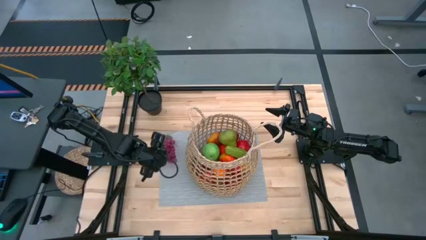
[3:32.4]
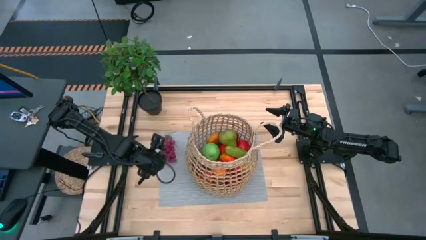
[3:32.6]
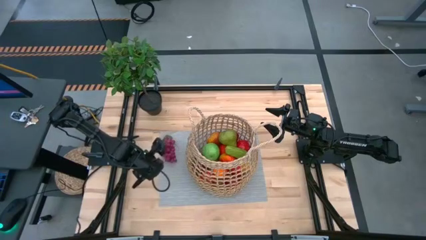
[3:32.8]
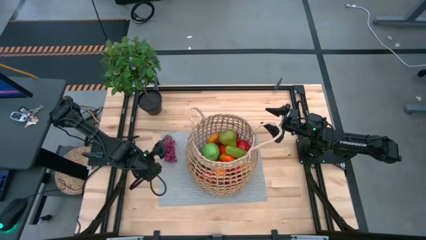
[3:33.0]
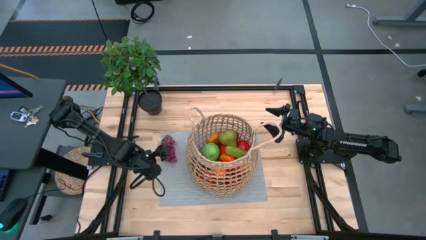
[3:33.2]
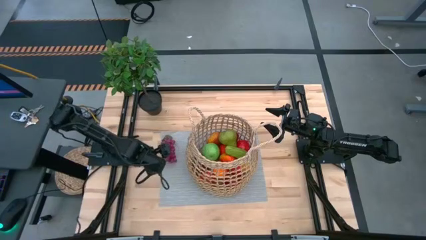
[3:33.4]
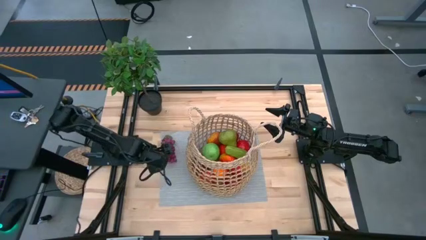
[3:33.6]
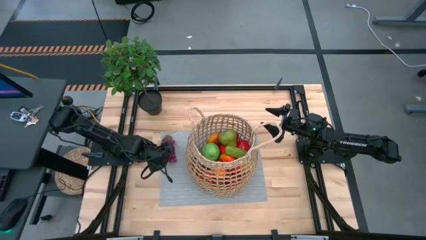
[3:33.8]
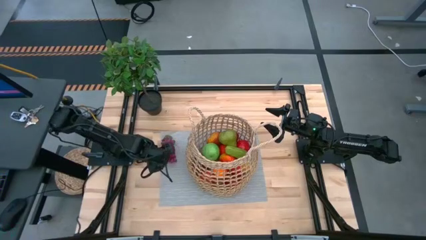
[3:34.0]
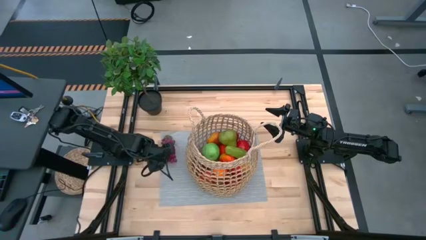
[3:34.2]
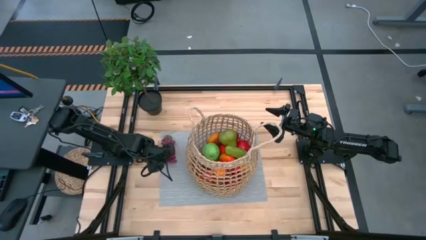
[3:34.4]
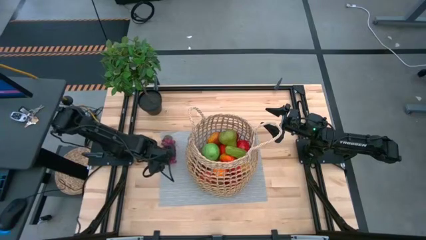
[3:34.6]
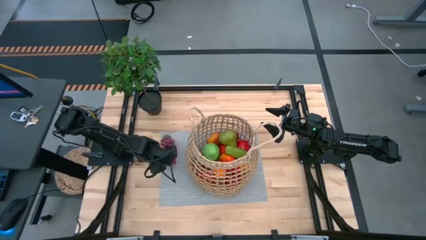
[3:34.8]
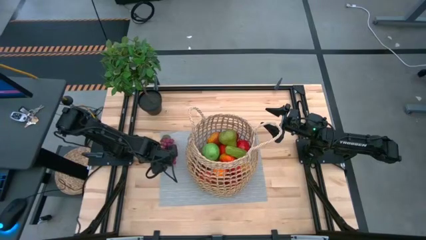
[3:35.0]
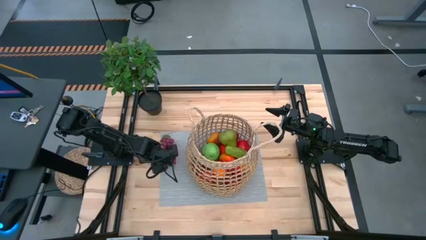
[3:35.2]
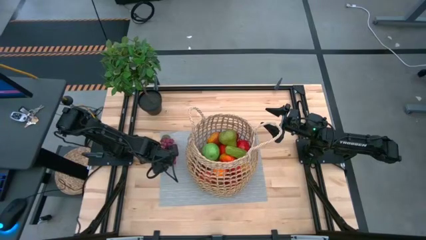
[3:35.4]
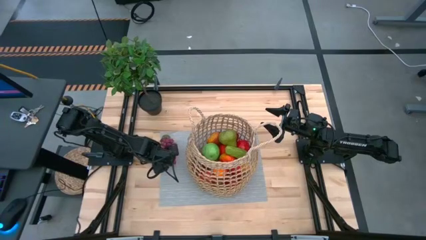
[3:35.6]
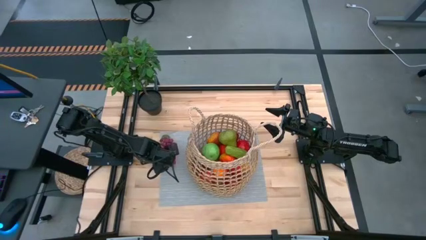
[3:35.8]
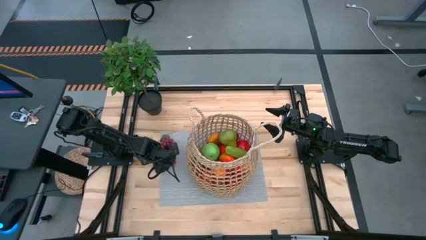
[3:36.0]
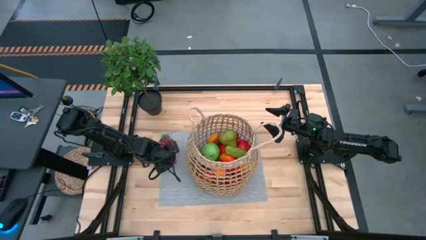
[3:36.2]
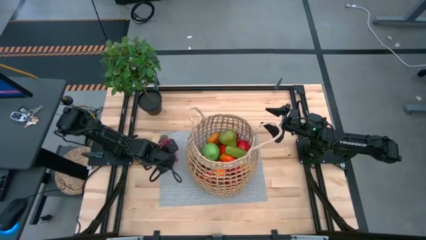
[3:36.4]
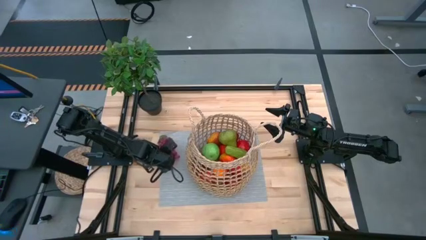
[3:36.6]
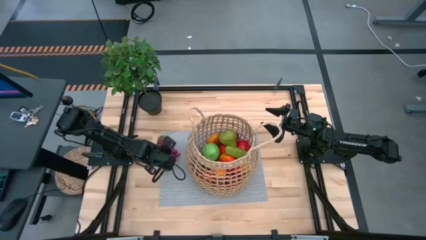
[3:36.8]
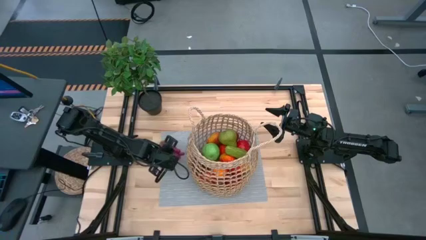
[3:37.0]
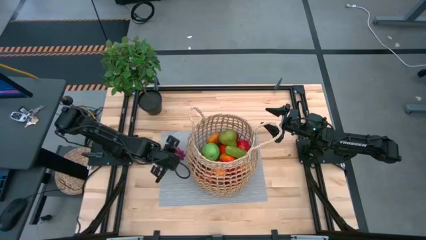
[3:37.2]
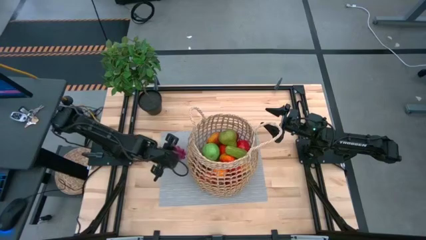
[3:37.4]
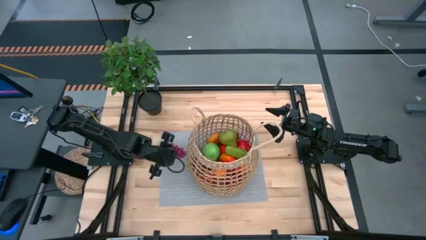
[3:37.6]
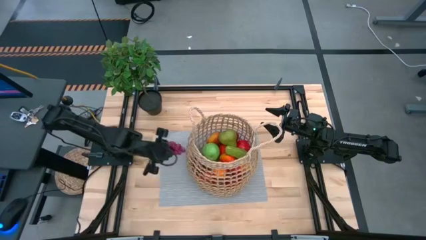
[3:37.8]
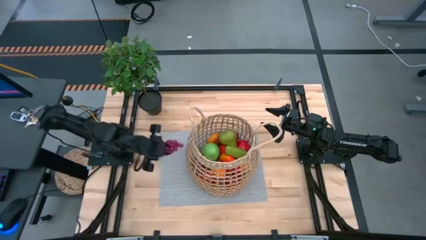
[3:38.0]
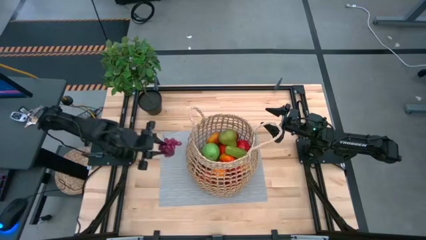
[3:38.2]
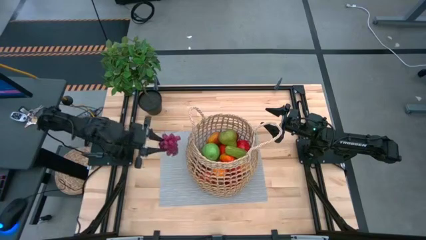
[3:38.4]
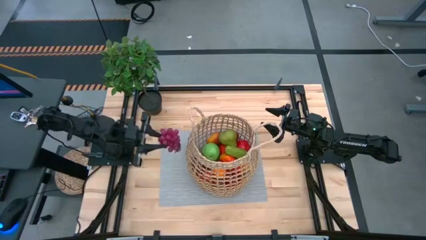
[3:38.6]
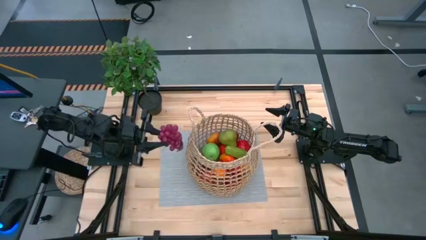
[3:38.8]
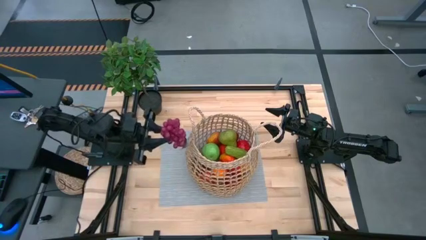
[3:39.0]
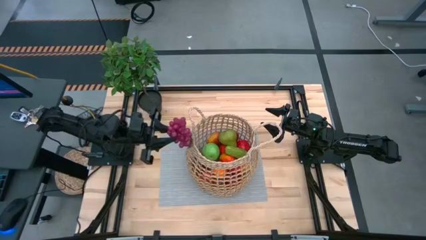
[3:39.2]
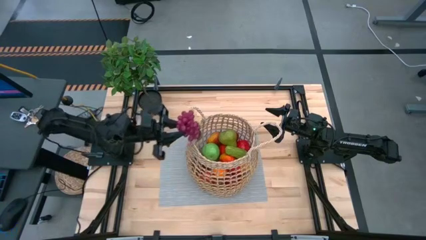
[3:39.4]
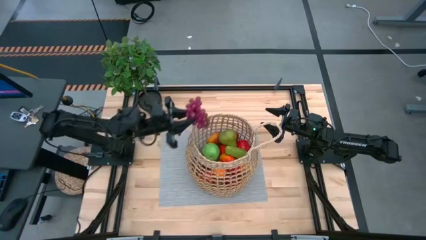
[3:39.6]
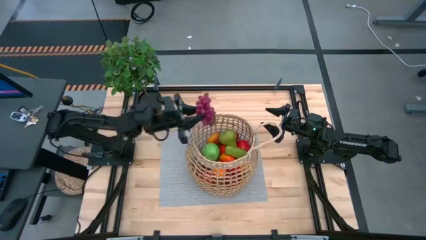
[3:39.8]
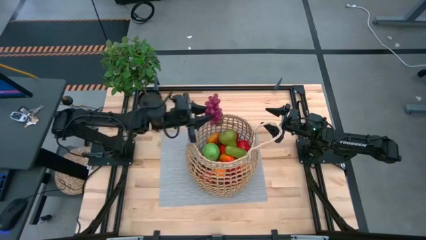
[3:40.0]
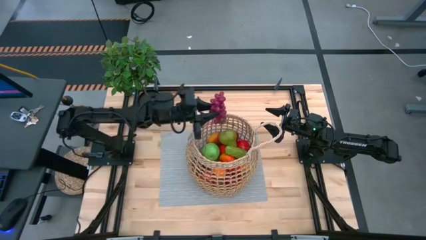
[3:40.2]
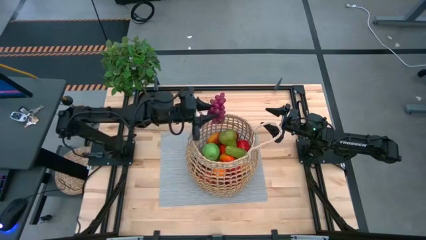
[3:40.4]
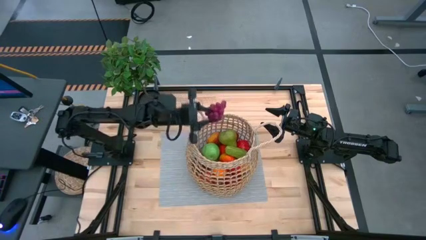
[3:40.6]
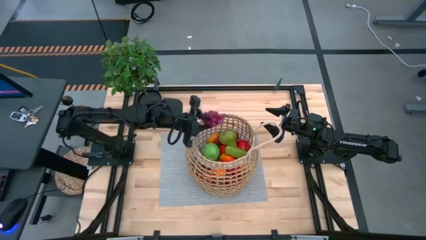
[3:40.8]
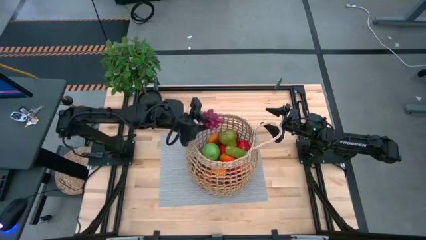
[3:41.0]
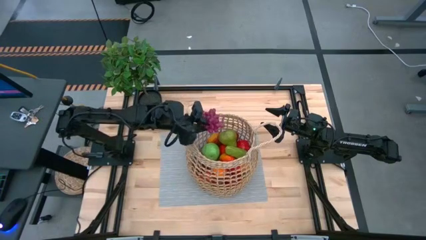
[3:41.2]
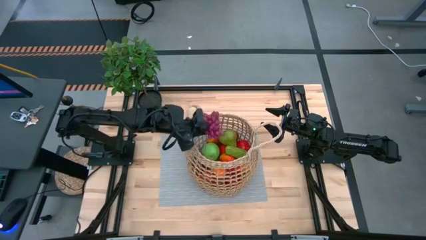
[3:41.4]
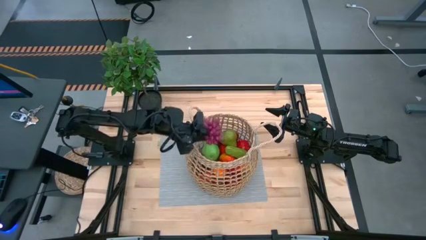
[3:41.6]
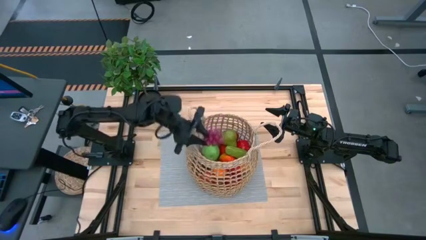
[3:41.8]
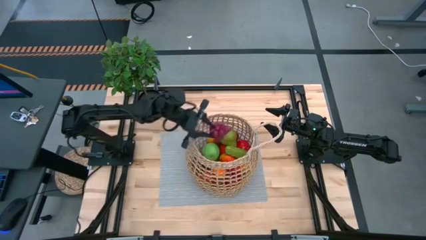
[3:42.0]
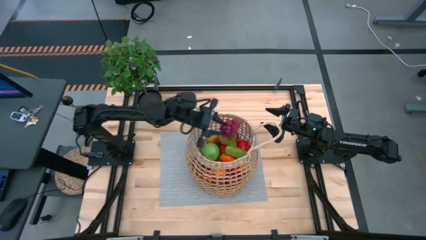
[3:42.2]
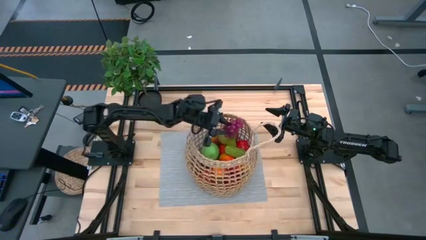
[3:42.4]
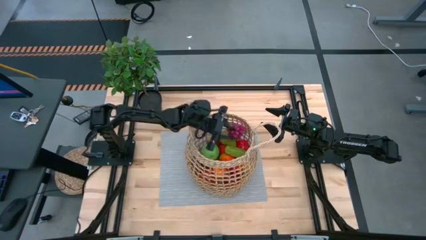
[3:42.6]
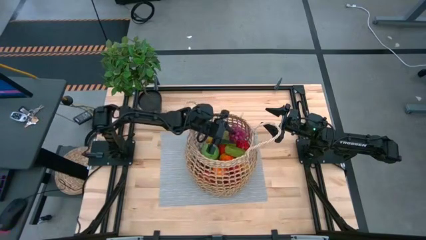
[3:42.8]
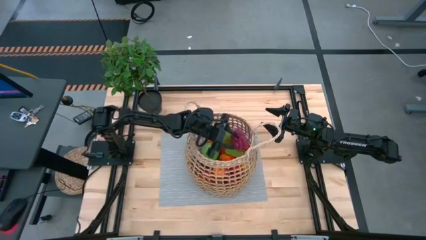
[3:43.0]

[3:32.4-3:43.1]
Task: Build produce basket
Put the violet grapes into the brown basket

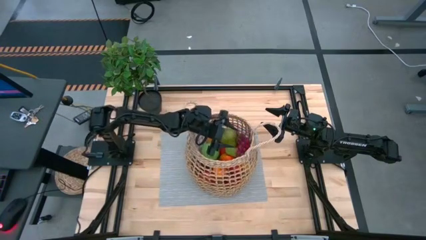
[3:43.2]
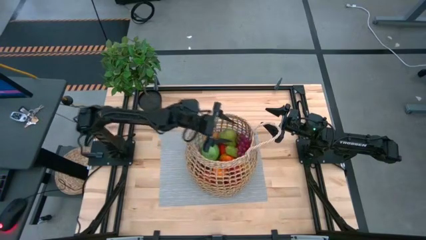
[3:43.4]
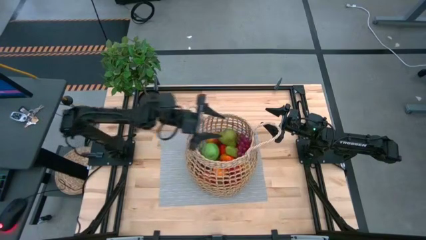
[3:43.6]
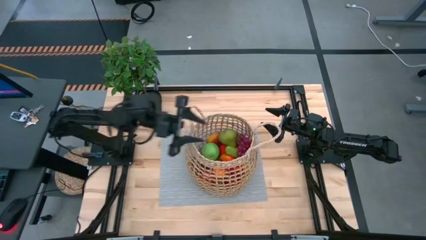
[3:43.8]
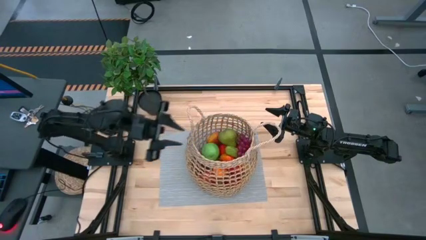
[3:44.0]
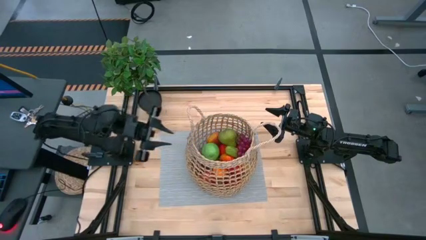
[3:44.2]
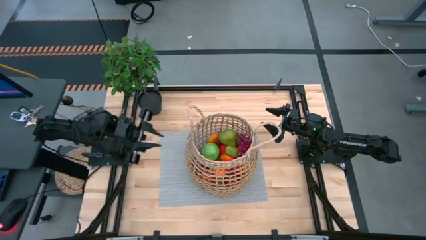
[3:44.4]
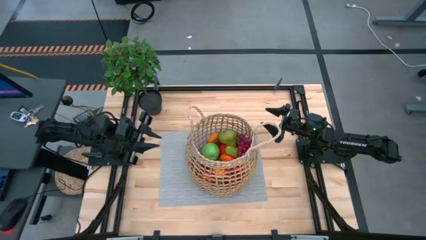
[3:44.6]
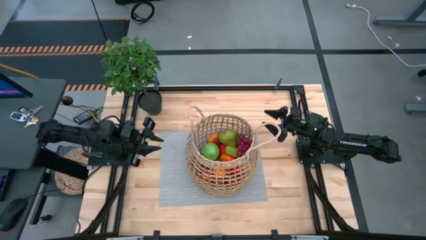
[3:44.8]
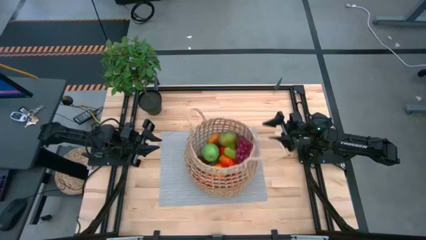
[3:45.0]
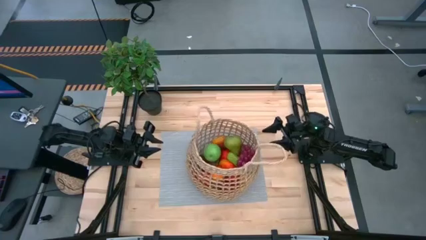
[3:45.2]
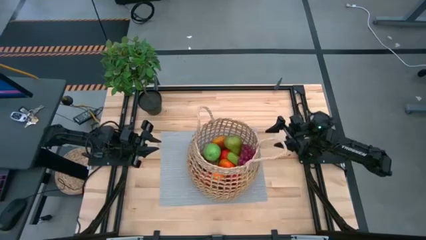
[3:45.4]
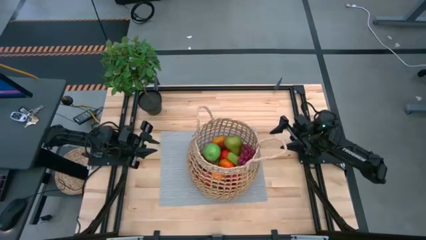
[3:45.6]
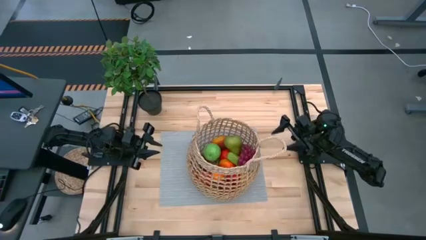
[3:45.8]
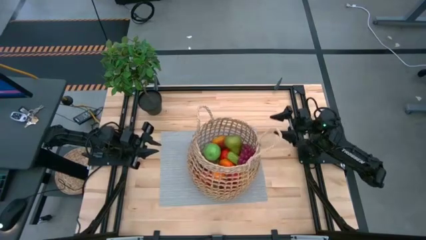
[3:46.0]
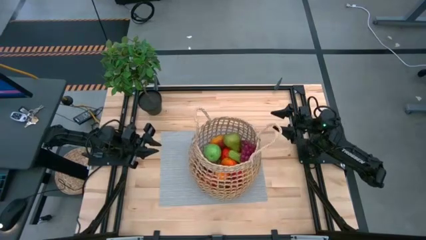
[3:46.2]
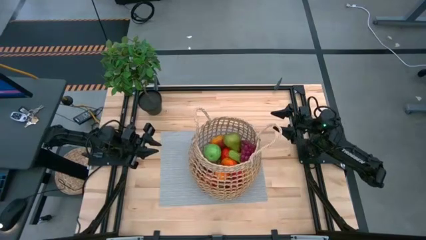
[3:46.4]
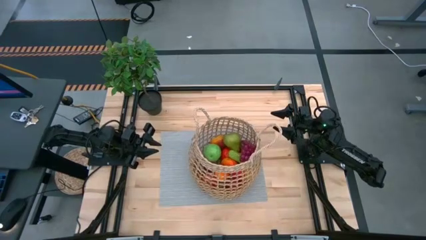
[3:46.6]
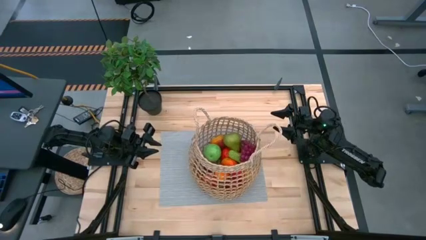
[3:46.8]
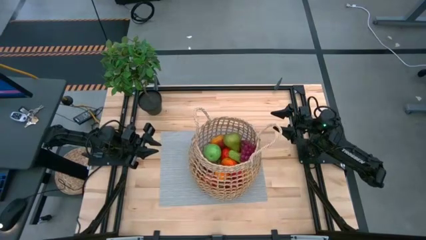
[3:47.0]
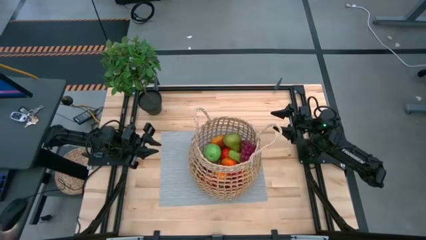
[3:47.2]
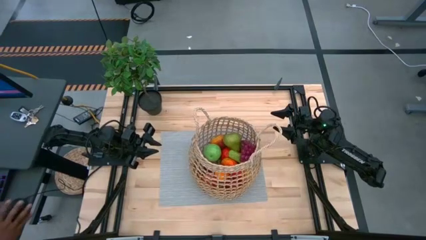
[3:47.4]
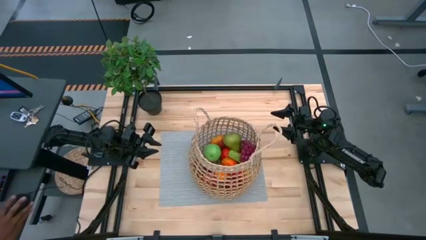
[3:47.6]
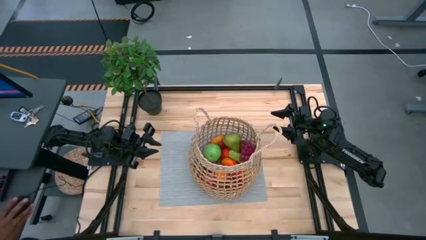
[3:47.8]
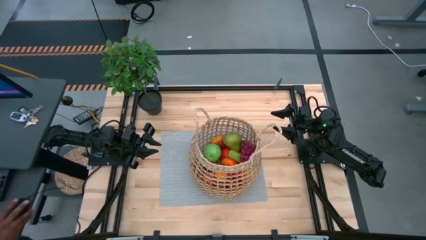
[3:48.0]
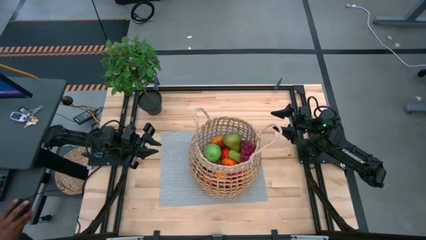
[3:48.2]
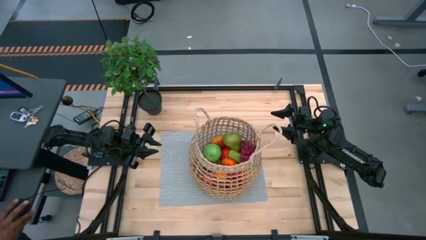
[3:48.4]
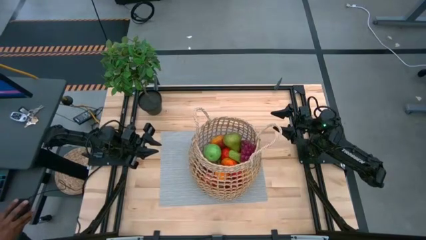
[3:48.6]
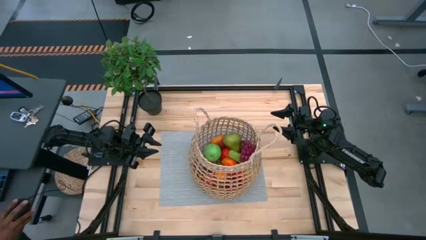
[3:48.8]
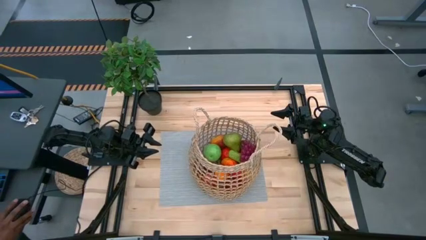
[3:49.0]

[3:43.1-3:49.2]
Return to Home Position
